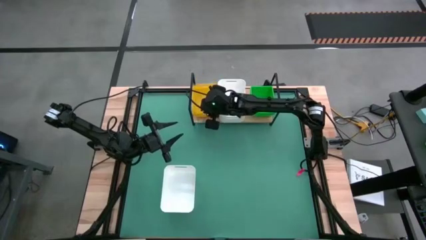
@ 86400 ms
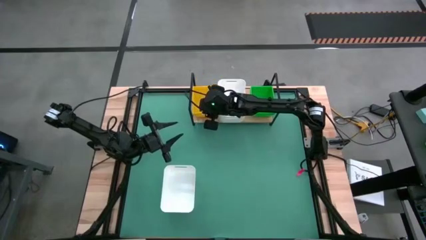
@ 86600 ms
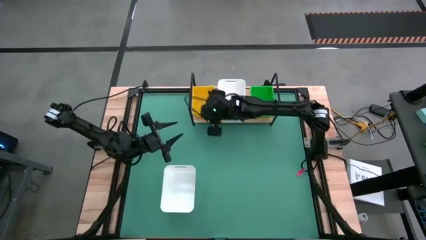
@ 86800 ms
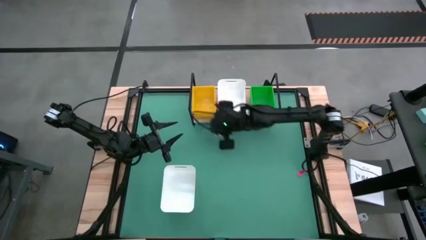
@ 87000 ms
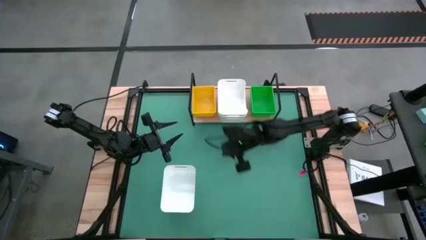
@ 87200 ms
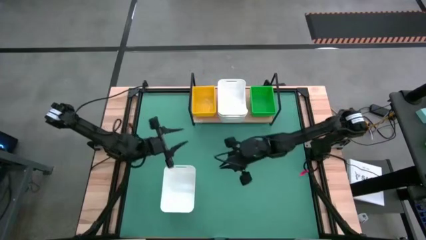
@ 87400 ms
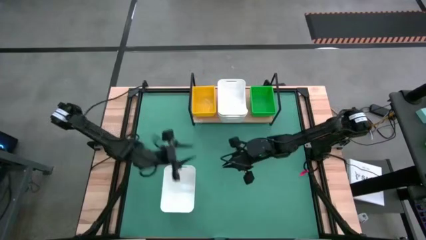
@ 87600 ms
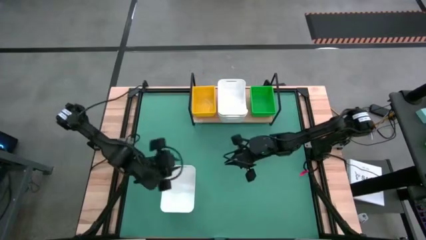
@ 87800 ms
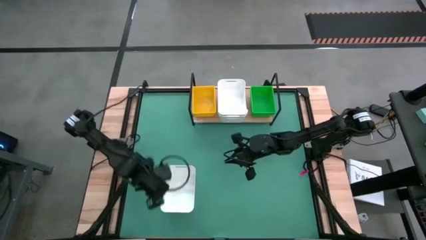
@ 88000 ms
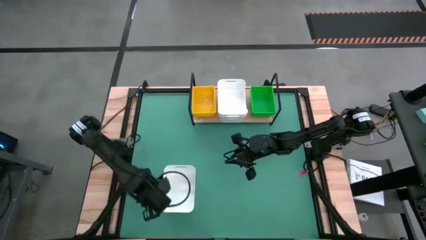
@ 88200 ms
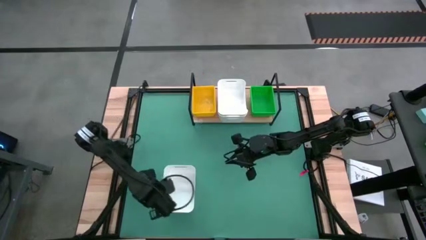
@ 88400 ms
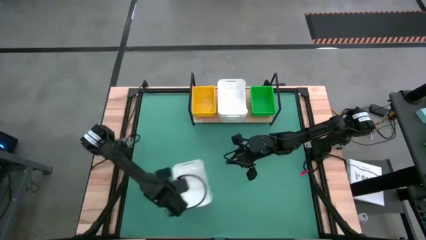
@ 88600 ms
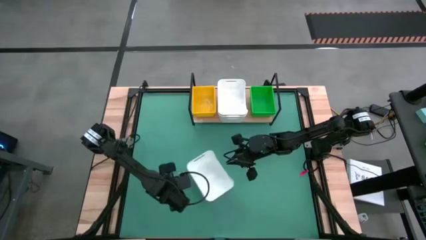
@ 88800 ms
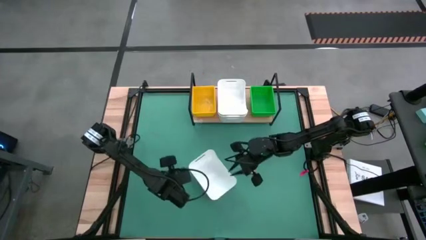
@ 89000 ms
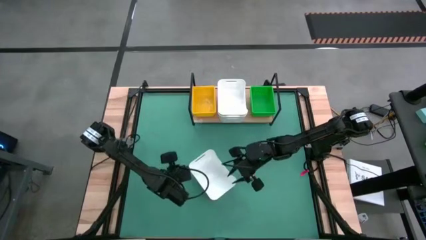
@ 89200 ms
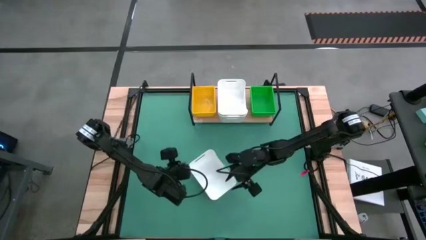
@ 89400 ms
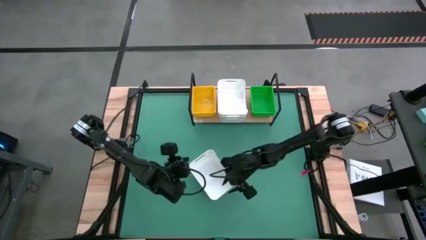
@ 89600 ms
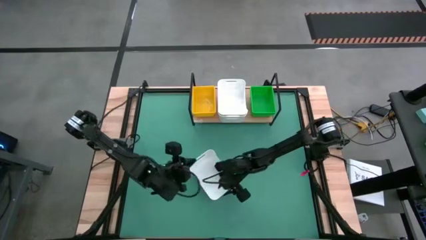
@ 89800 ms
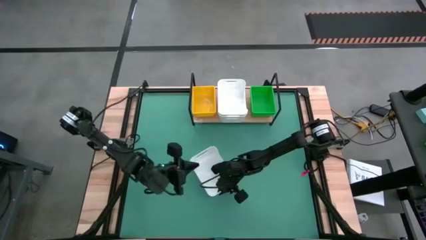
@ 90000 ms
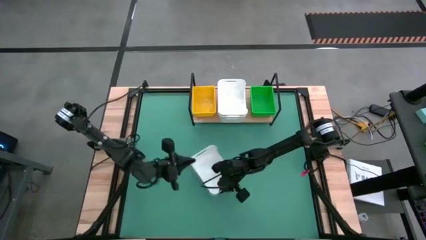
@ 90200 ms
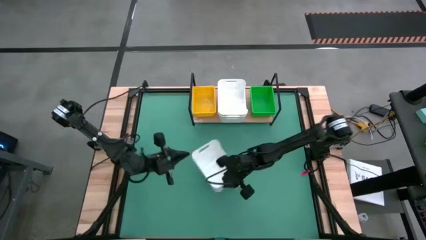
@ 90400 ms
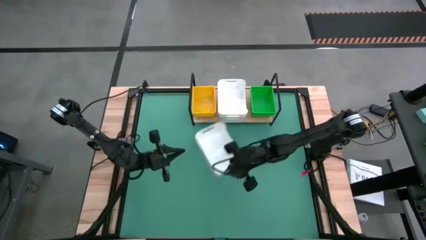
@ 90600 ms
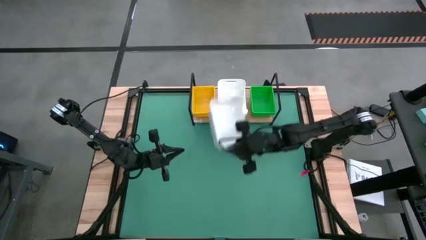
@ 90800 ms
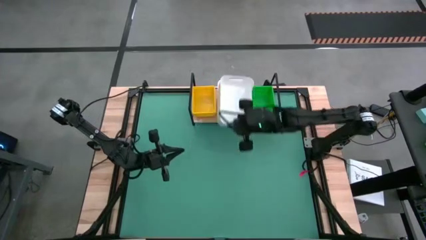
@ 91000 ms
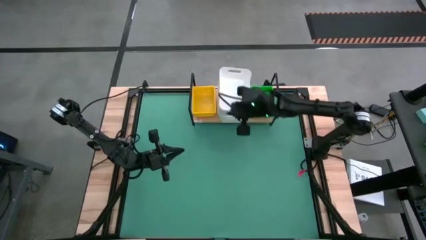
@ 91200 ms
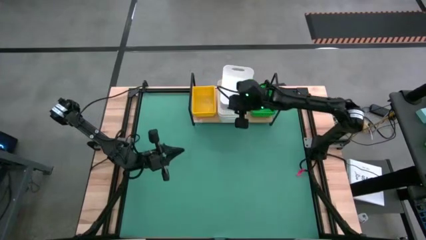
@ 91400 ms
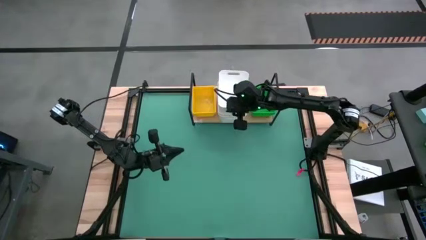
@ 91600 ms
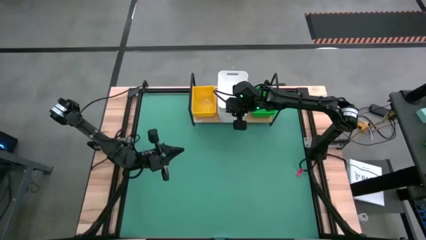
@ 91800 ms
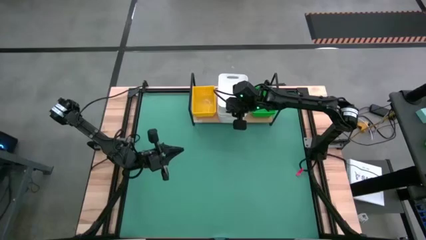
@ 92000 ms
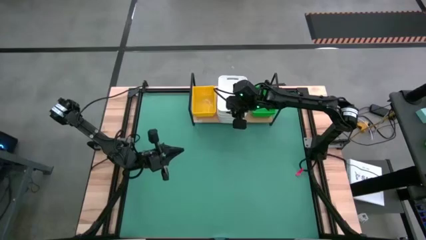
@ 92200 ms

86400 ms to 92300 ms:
Task: Stack baskets on shelf by color
Stack the white bin on top of the white bin on the shelf

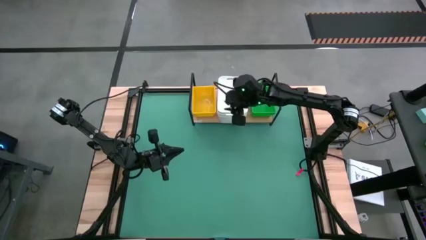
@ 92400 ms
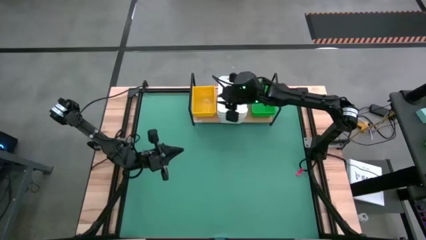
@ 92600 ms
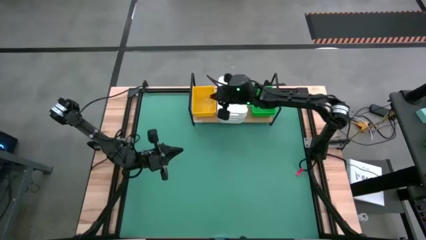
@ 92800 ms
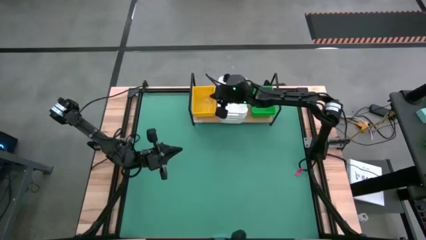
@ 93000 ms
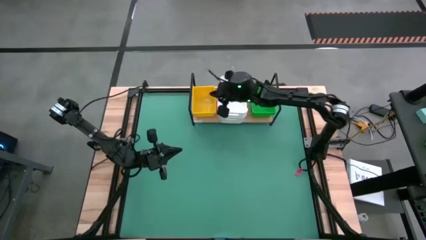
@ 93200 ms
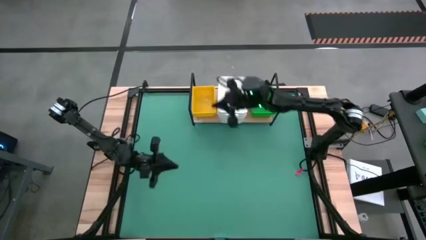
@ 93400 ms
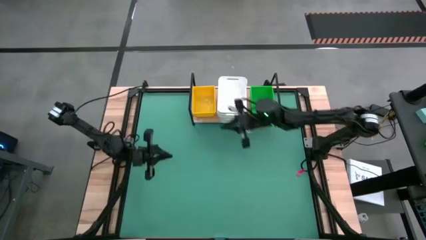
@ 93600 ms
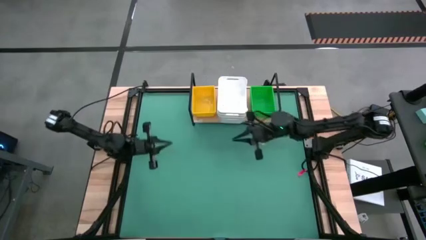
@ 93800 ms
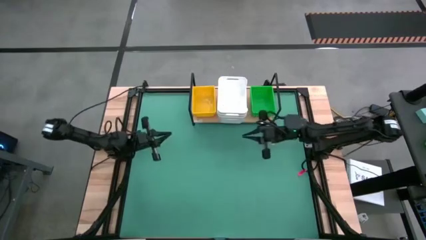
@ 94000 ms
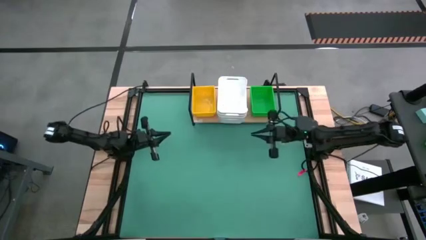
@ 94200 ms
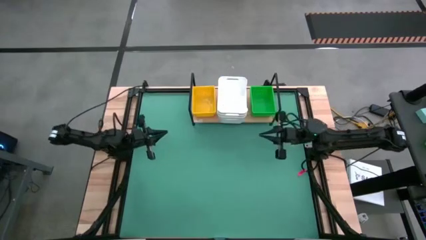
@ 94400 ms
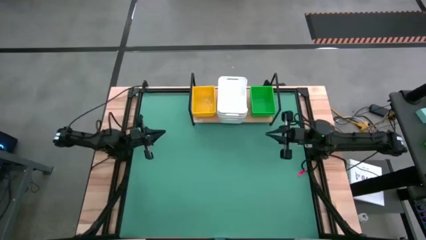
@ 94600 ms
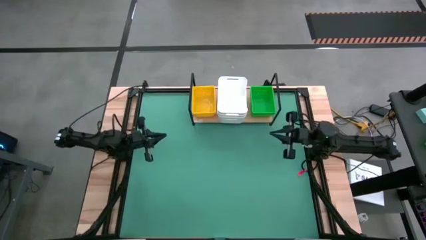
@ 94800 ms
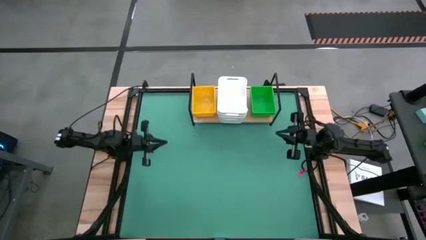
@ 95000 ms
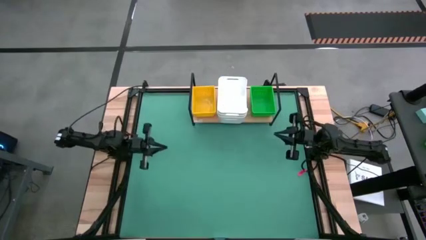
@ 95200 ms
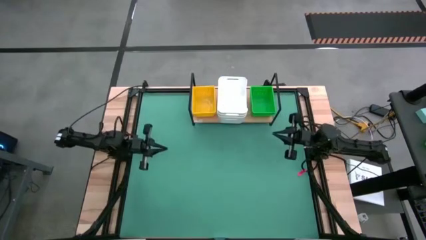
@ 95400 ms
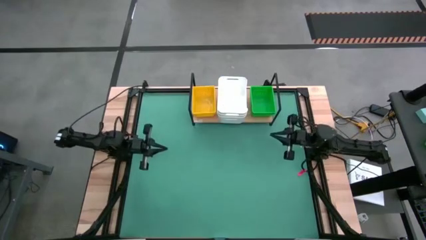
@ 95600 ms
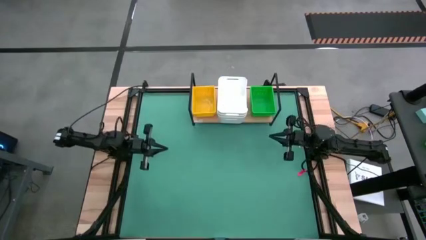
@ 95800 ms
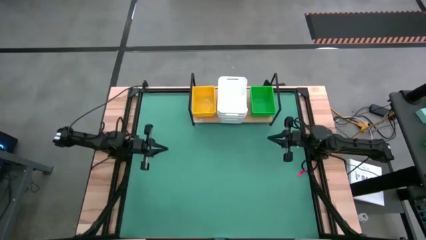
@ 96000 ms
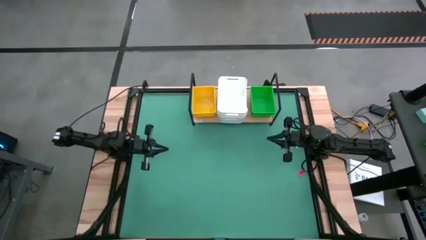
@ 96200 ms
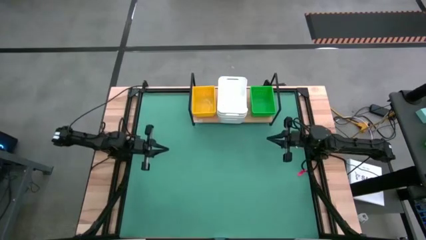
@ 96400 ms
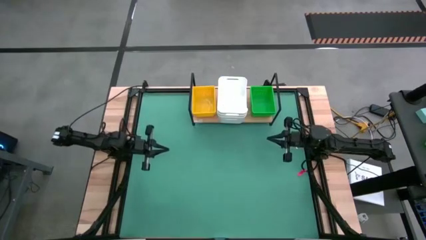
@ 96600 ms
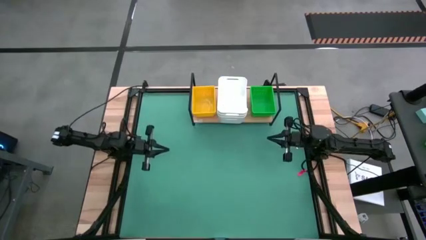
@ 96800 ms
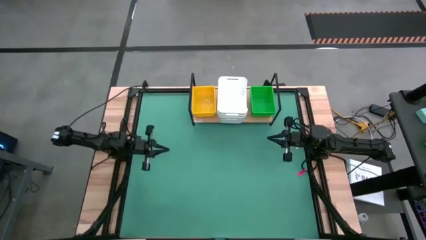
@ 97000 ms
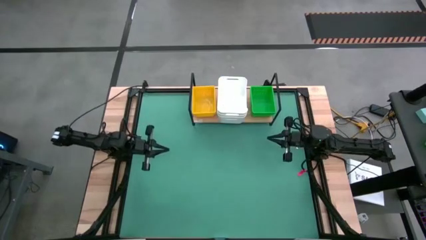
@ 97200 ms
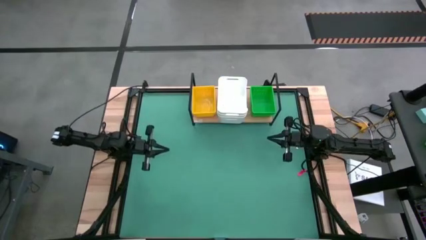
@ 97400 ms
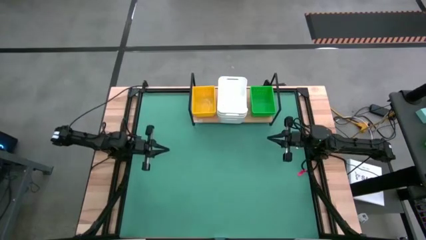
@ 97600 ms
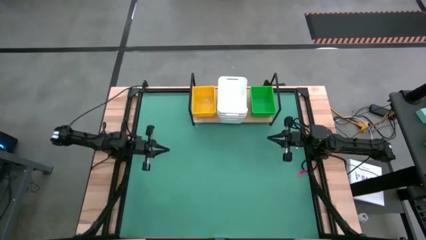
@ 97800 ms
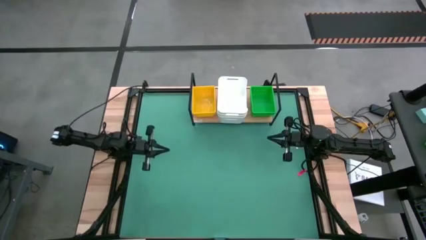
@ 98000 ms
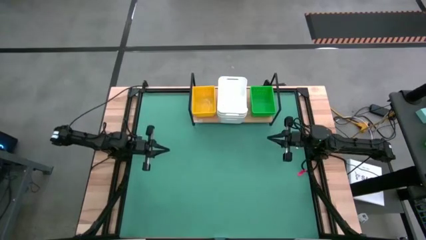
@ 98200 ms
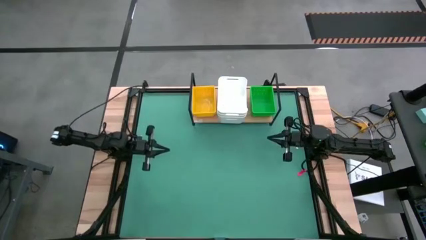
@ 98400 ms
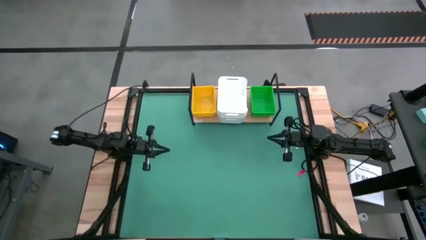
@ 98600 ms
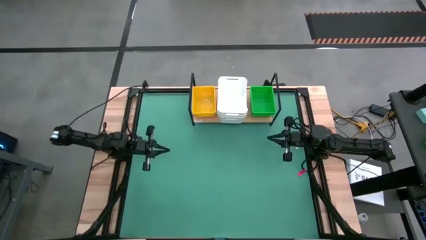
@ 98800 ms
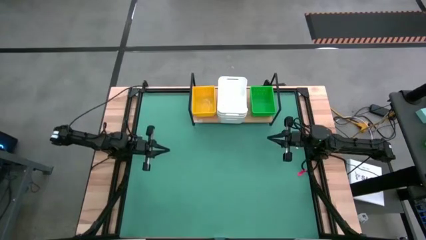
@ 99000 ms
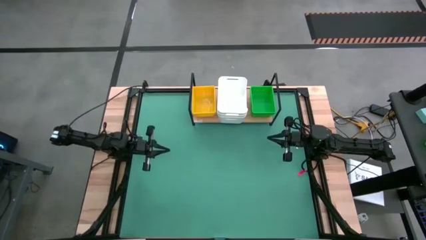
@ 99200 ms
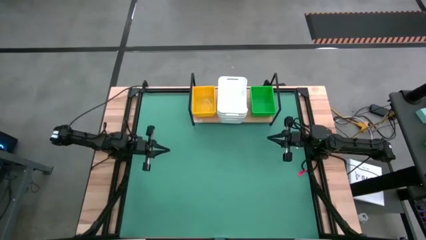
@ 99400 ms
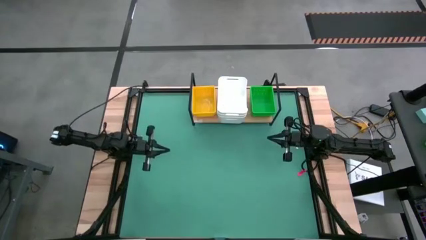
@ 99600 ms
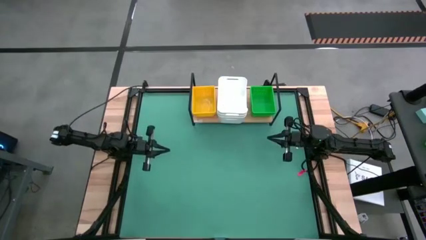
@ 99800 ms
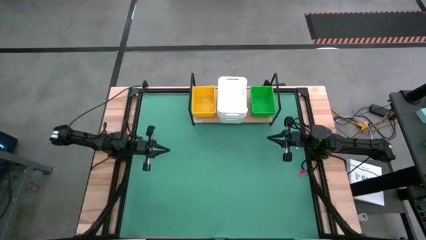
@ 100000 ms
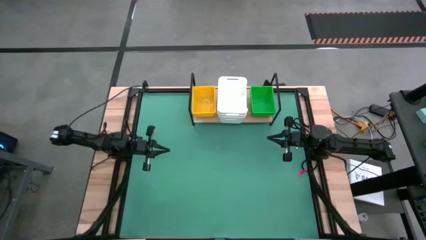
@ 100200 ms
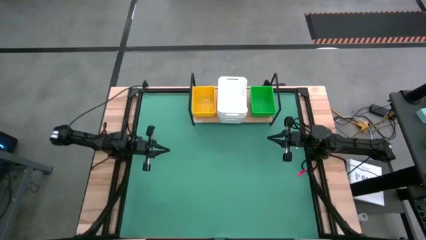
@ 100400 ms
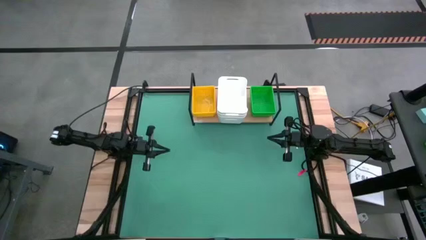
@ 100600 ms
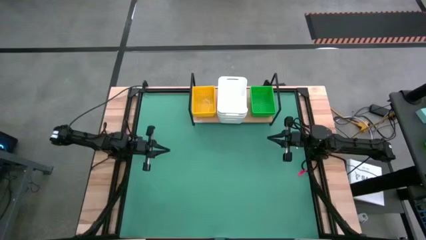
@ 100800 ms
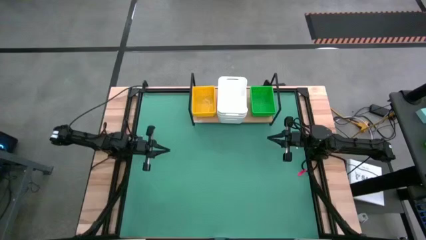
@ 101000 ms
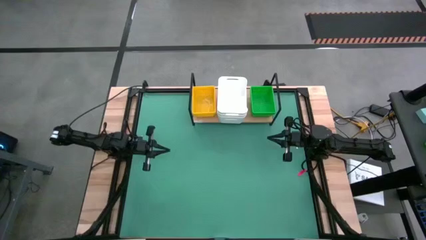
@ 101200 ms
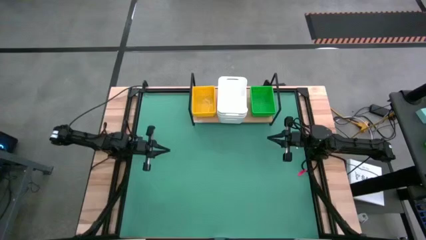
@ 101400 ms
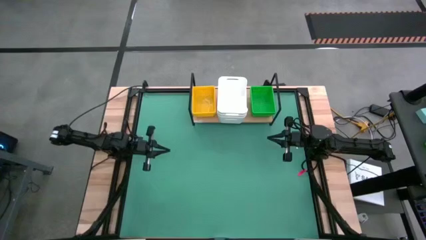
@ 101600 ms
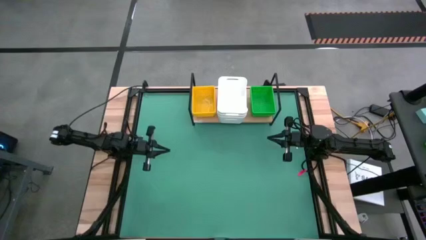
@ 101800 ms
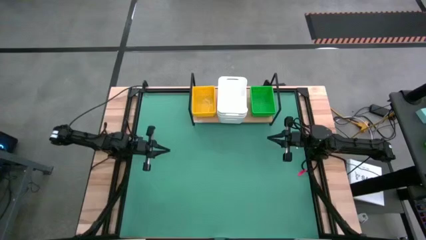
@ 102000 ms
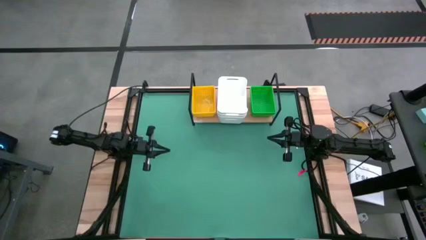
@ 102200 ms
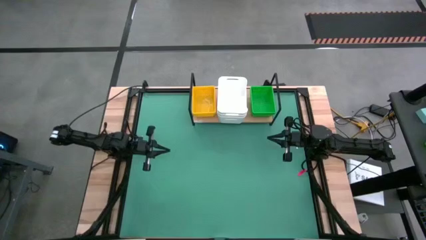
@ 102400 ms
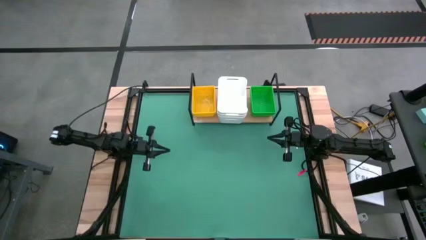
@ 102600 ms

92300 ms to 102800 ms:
Return to Home Position
